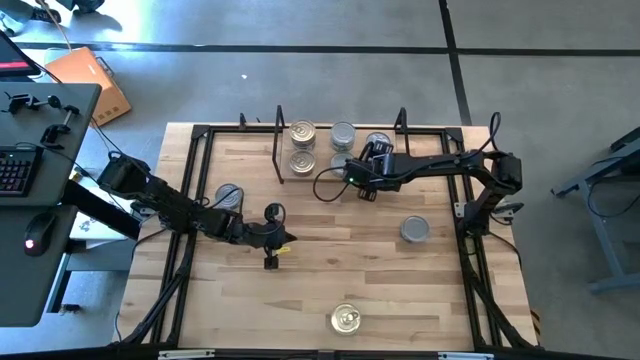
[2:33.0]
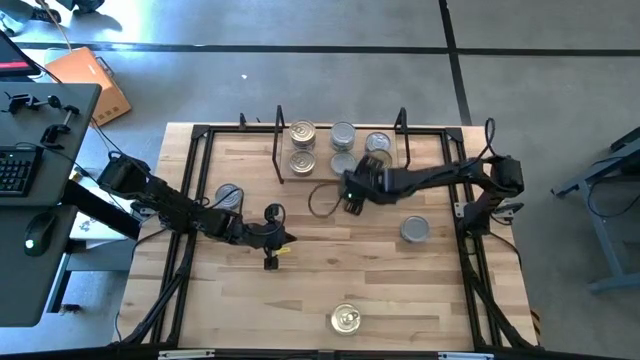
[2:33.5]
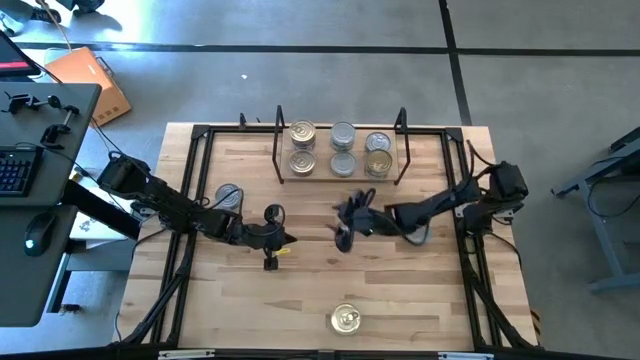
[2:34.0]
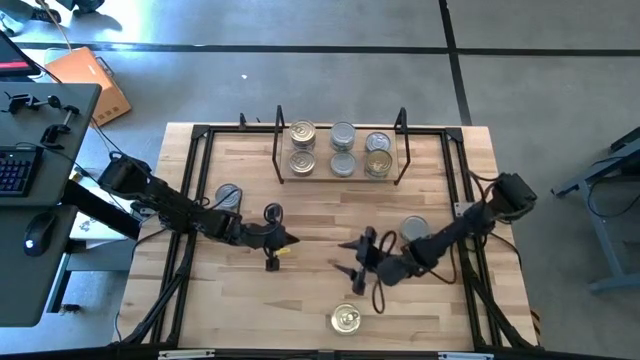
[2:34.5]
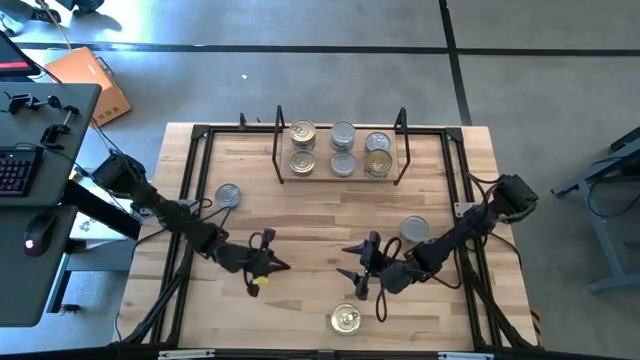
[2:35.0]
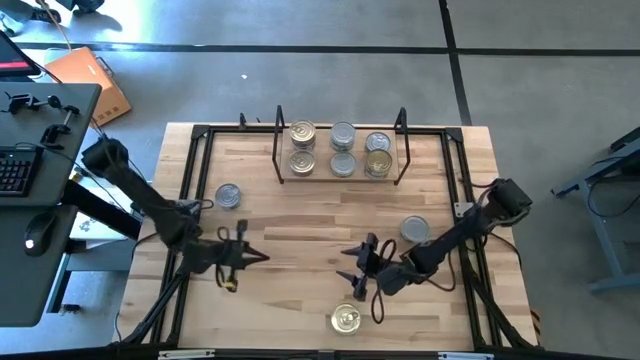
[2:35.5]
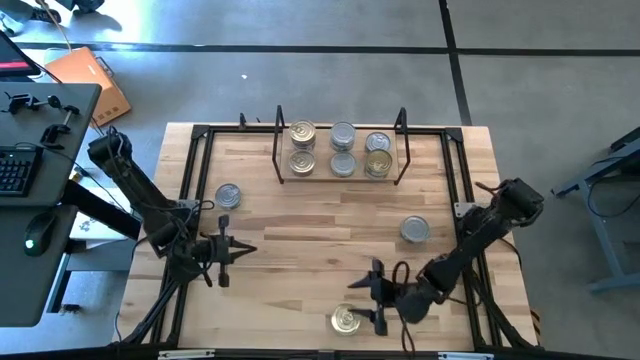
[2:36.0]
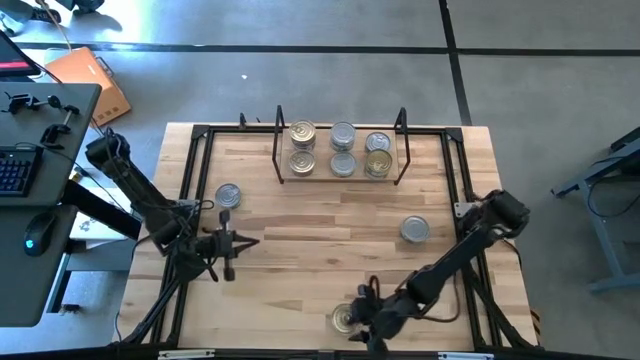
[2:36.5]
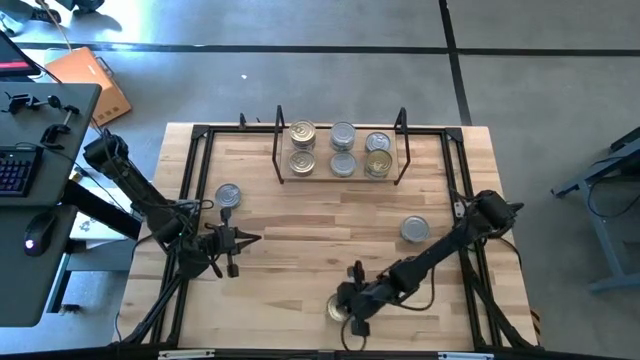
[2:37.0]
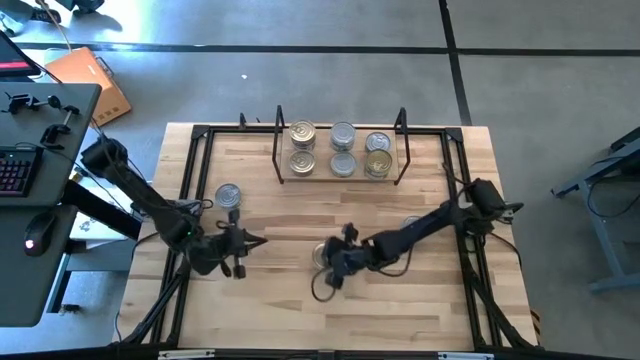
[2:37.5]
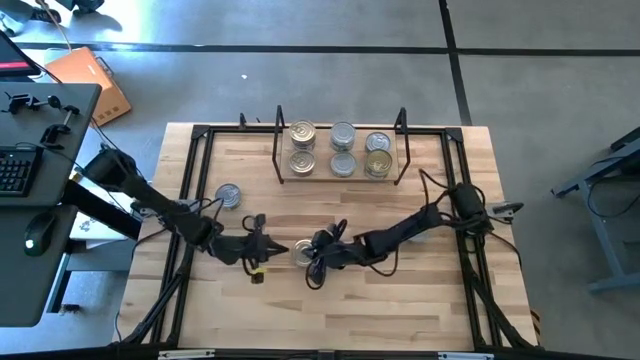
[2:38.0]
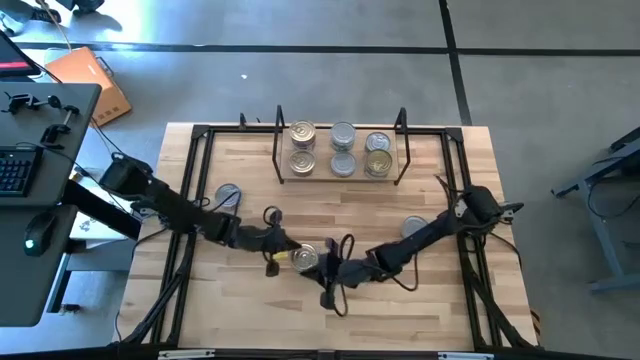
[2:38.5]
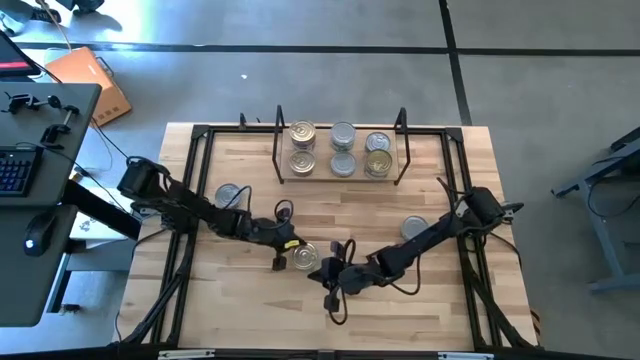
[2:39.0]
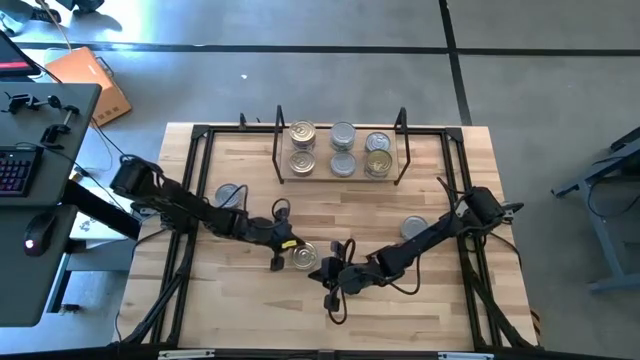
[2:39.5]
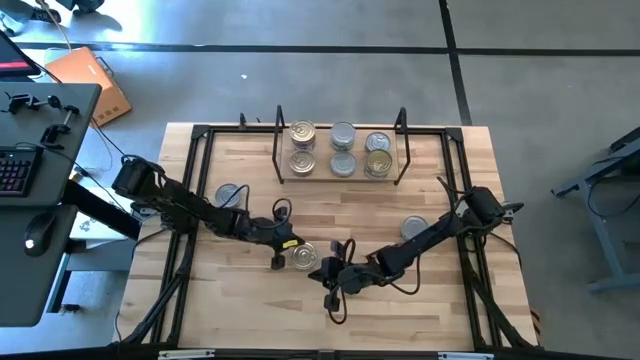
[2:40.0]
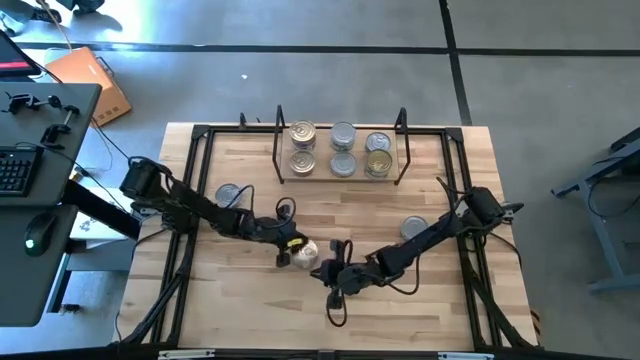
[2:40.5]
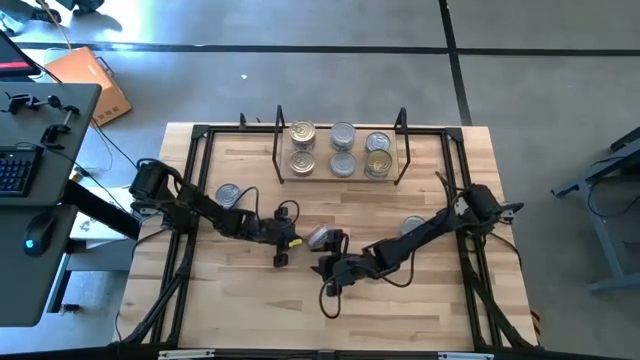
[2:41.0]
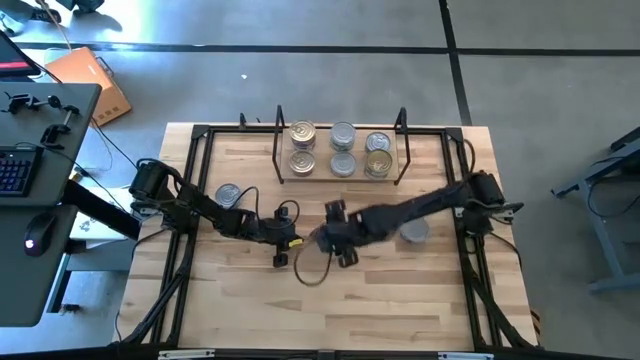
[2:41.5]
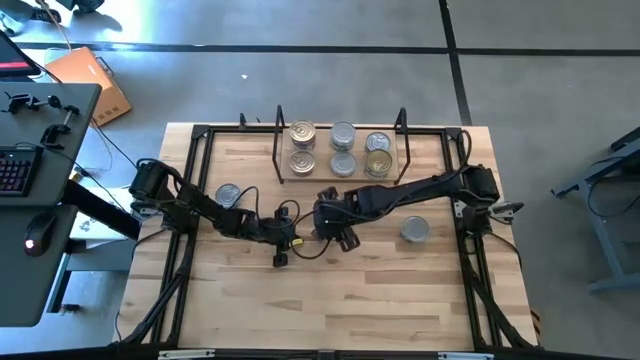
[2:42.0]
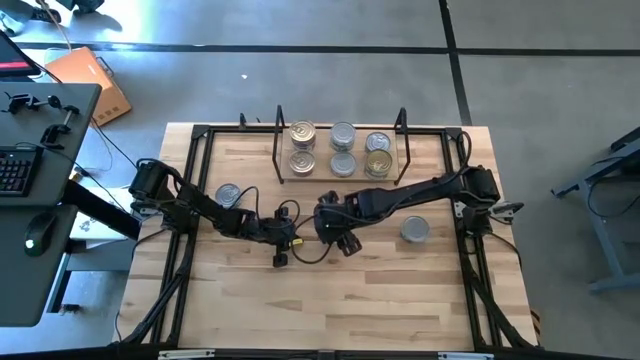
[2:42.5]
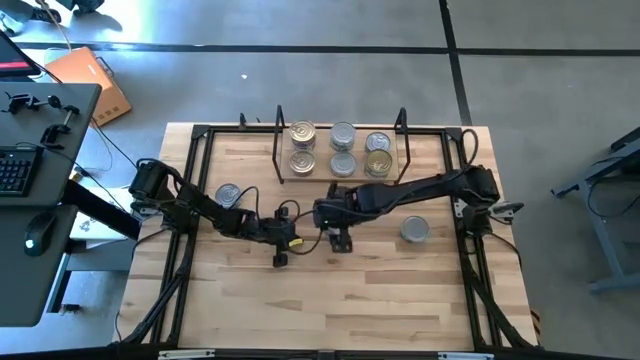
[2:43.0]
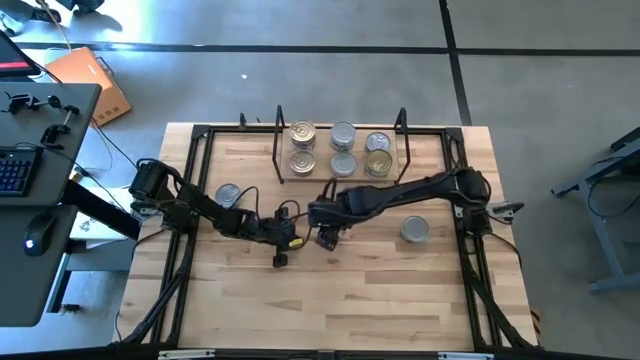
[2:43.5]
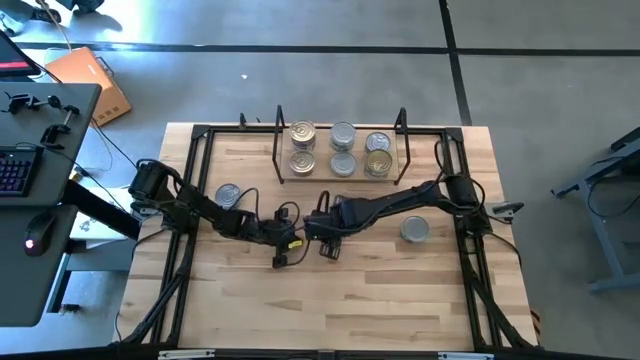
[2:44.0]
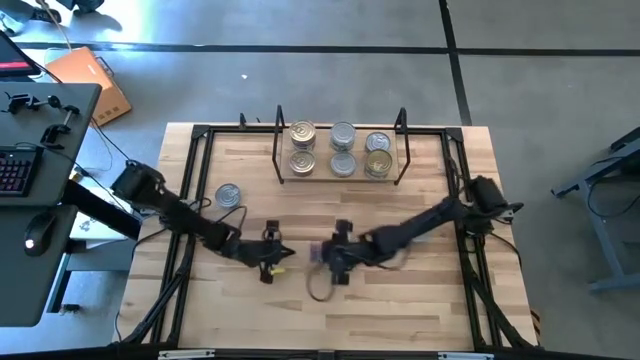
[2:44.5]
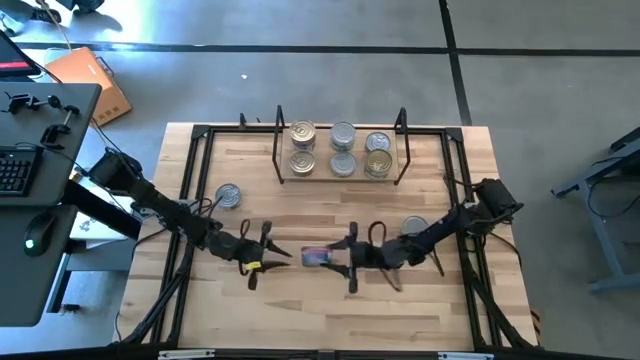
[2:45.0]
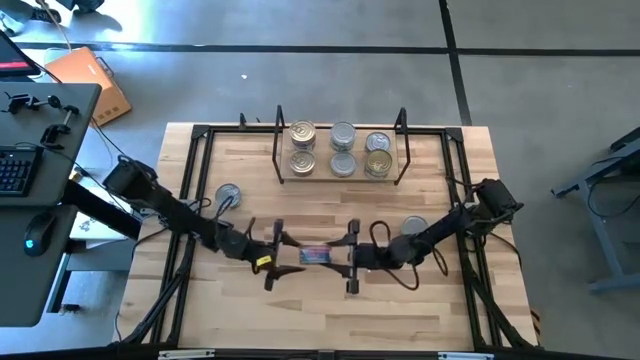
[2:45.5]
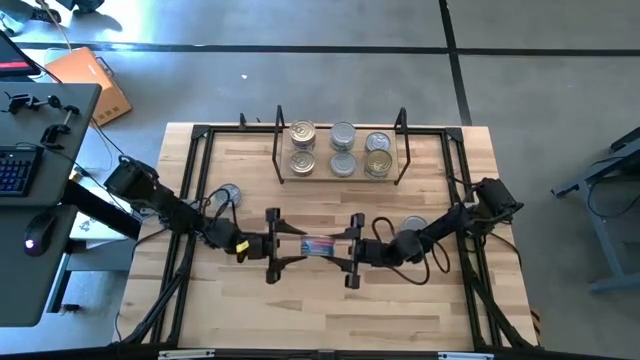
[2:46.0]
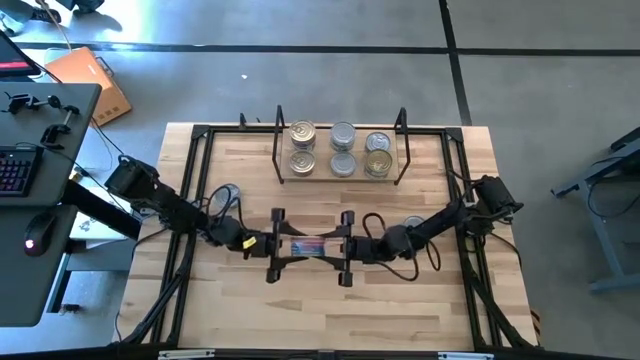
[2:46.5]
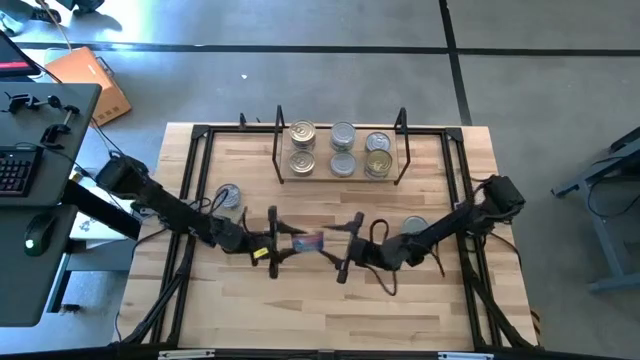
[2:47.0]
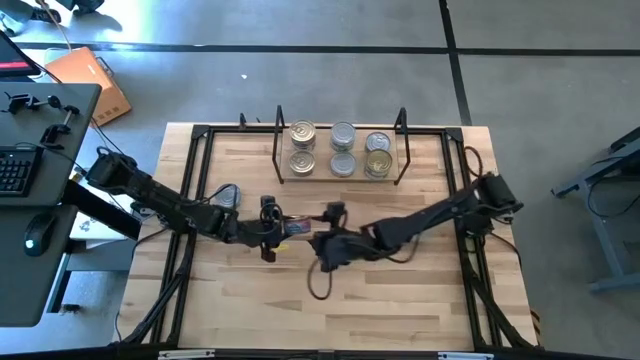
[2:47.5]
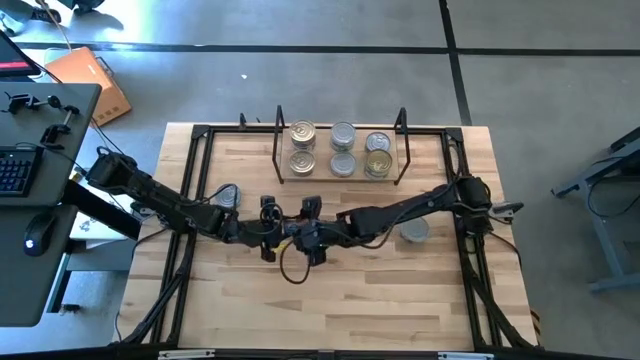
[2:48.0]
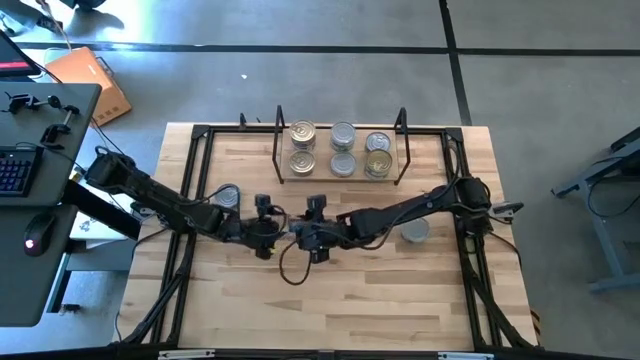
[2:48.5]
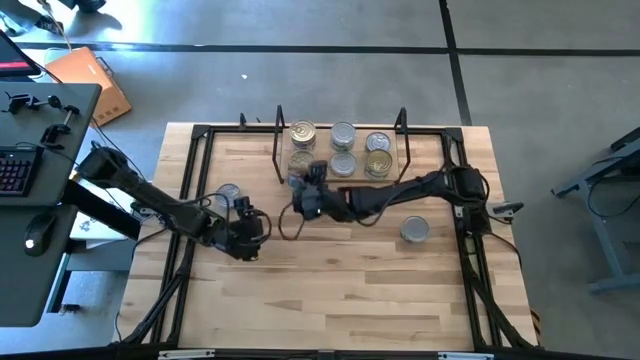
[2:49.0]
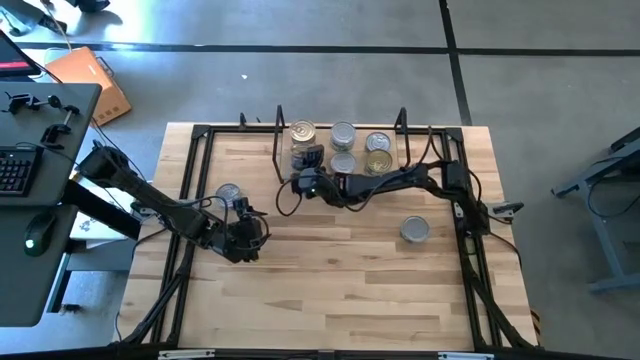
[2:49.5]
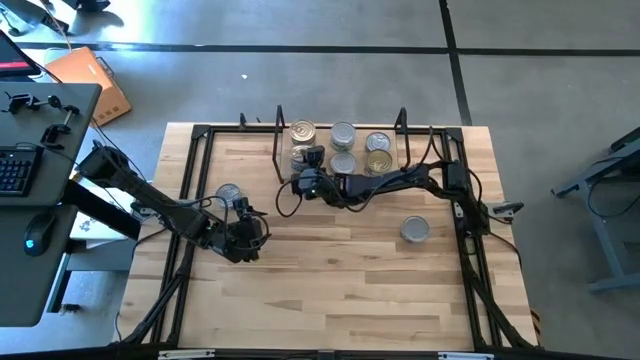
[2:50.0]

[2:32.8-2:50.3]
Task: Stack canned seafood by type on shelf
Stack the blue-pink tuna can on top of the blue-pink tuna can on the shelf

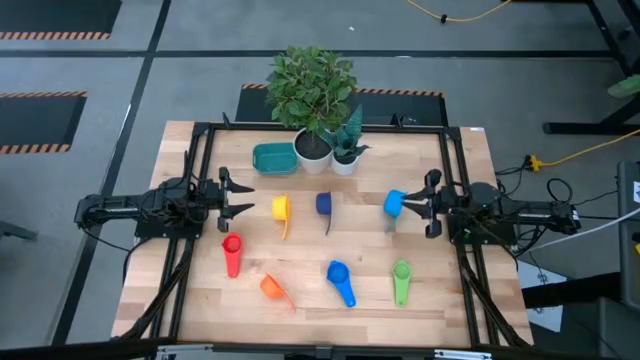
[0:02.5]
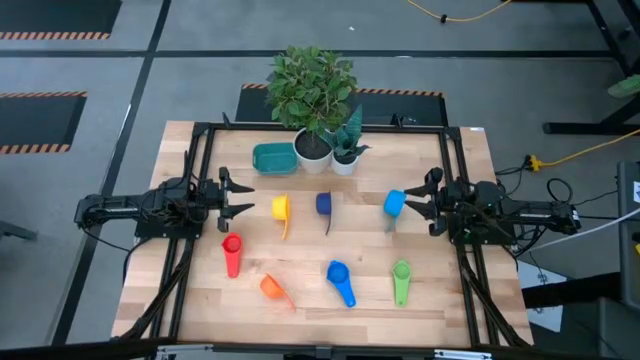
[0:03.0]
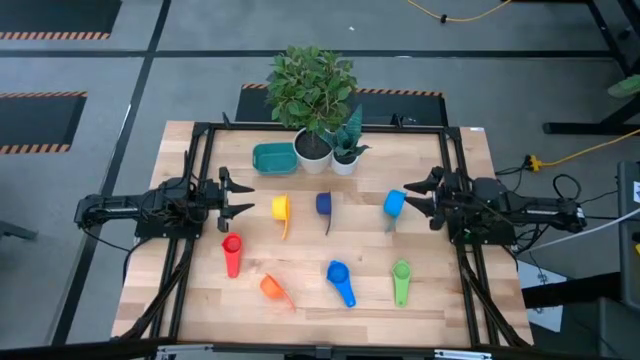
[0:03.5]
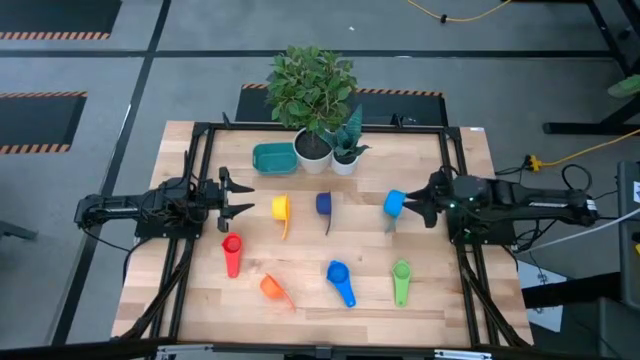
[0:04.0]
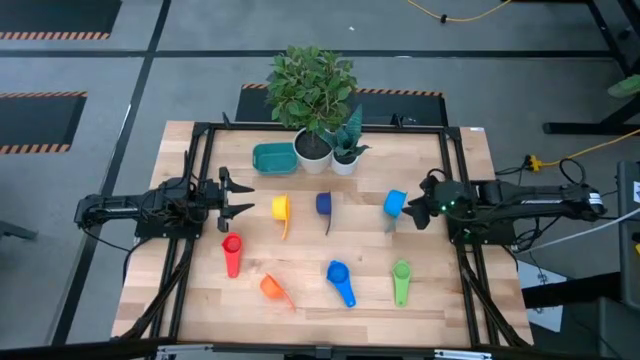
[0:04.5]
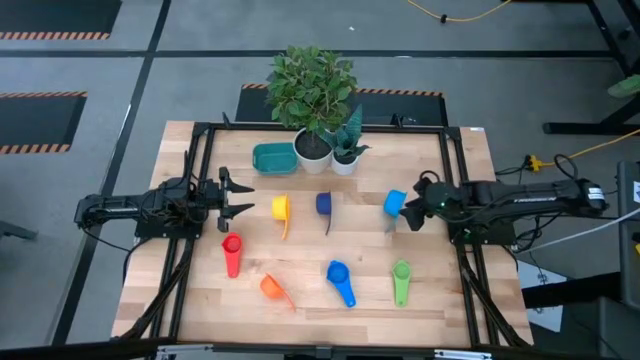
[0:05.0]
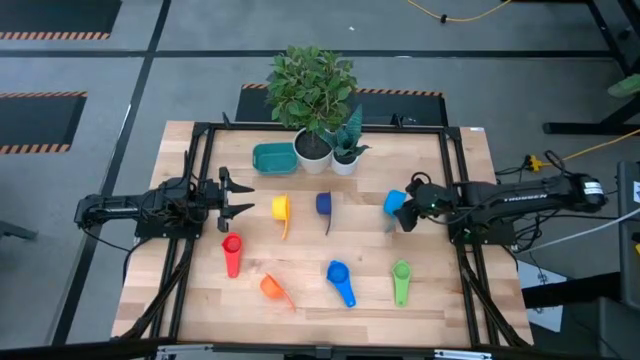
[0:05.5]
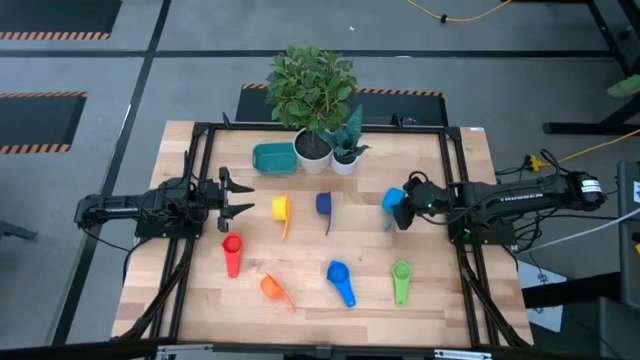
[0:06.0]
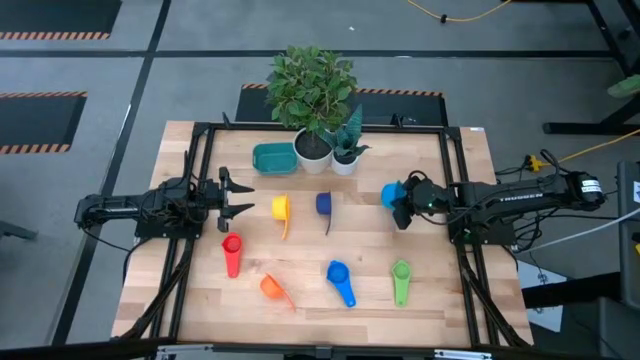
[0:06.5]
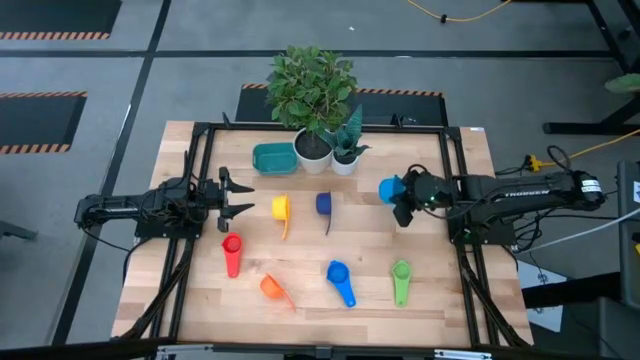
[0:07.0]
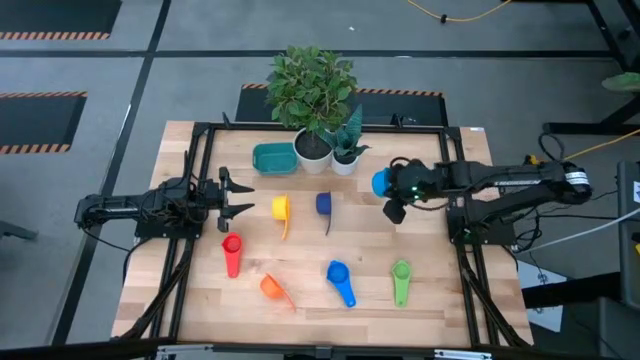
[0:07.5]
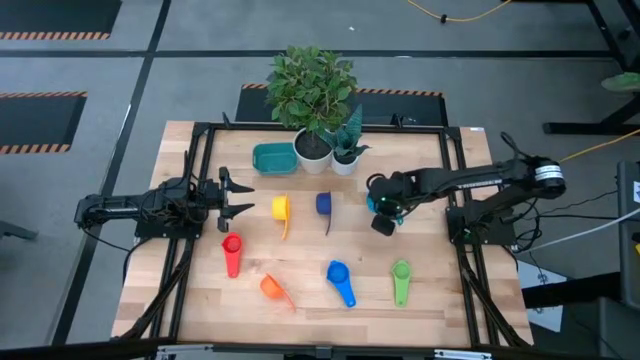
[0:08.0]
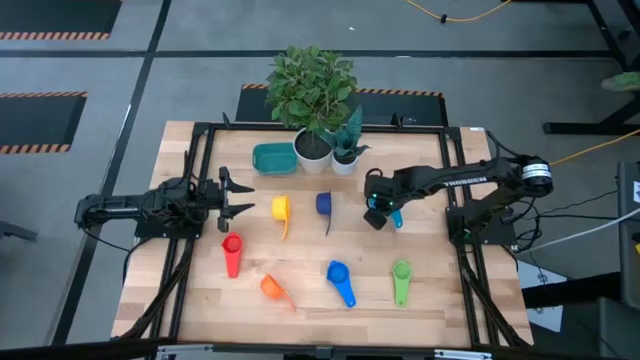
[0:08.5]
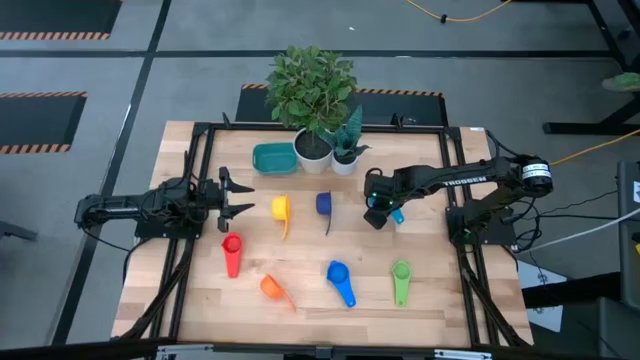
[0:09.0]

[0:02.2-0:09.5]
Task: Nest measuring cups in basket
Prepare the top light blue measuring cup
